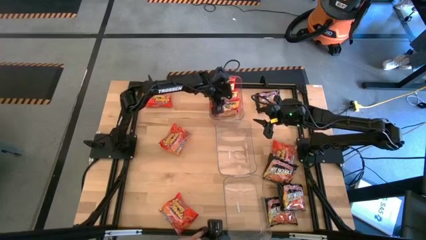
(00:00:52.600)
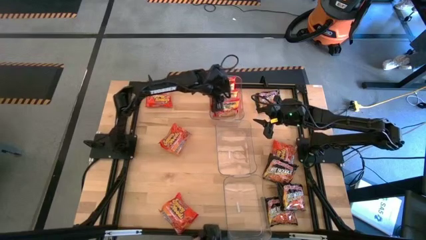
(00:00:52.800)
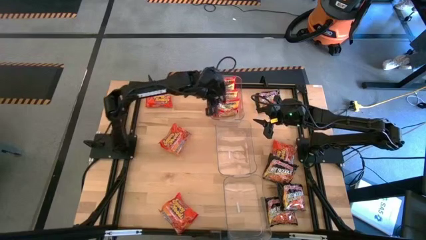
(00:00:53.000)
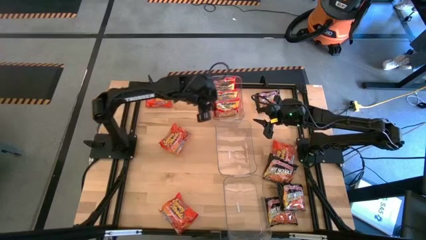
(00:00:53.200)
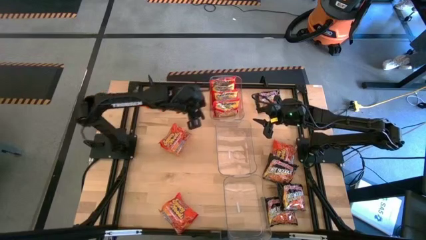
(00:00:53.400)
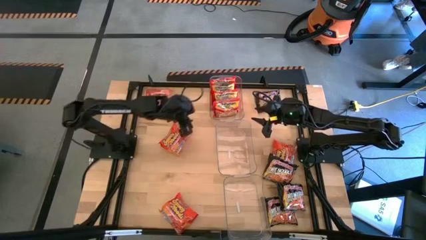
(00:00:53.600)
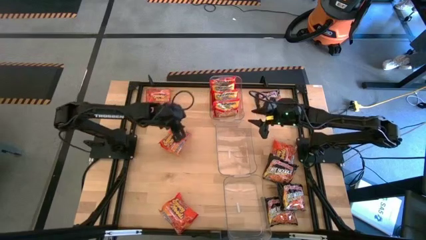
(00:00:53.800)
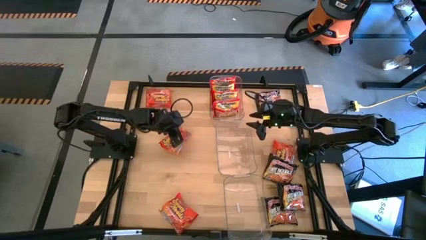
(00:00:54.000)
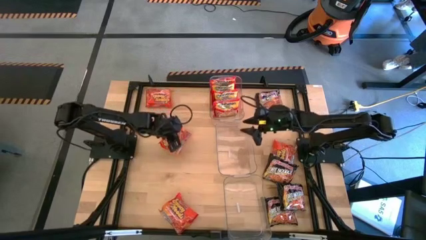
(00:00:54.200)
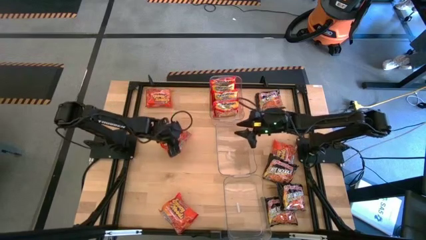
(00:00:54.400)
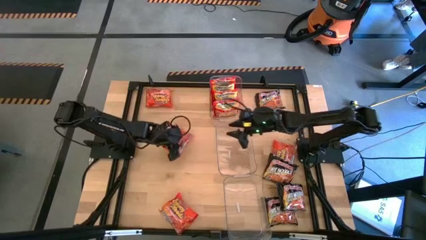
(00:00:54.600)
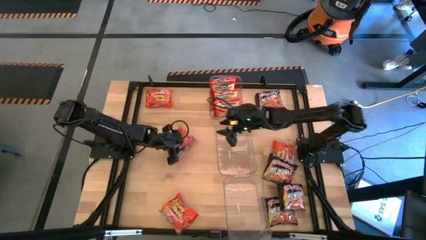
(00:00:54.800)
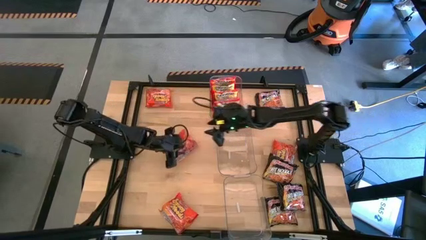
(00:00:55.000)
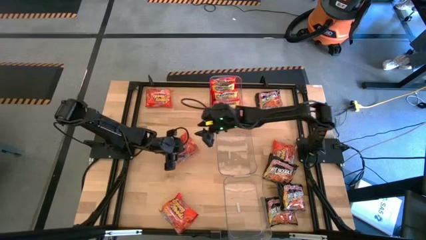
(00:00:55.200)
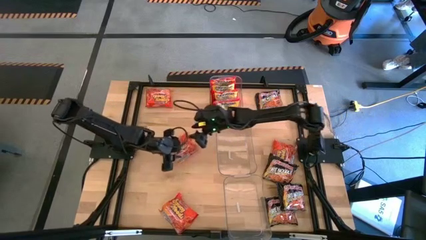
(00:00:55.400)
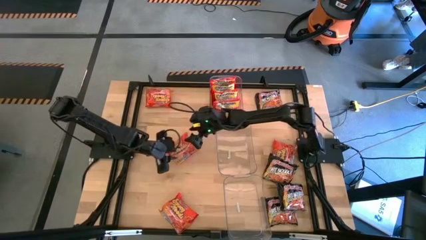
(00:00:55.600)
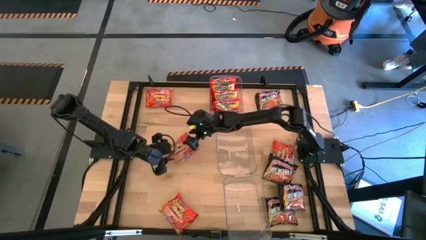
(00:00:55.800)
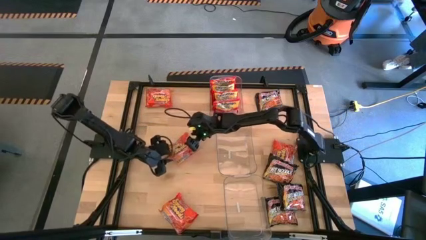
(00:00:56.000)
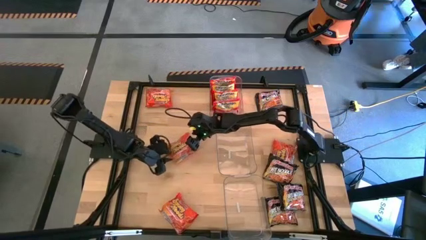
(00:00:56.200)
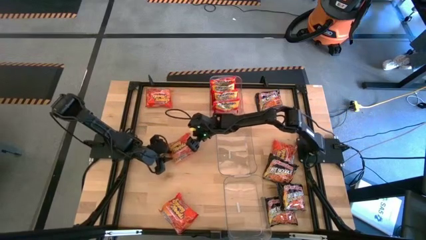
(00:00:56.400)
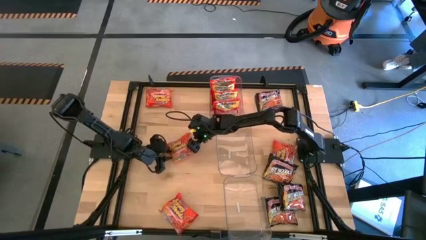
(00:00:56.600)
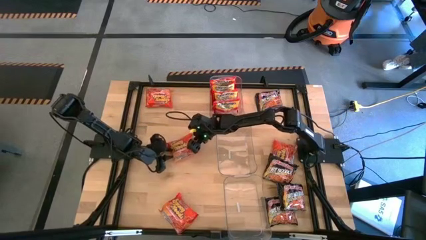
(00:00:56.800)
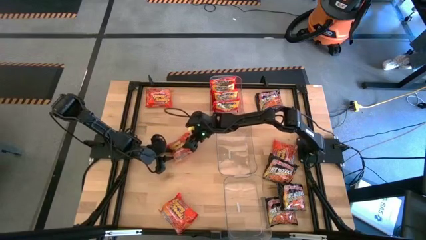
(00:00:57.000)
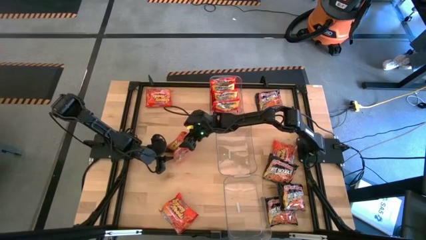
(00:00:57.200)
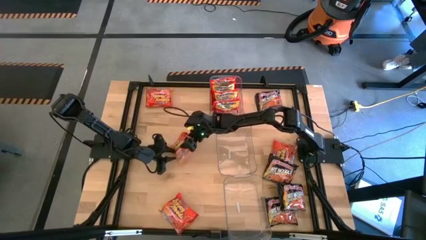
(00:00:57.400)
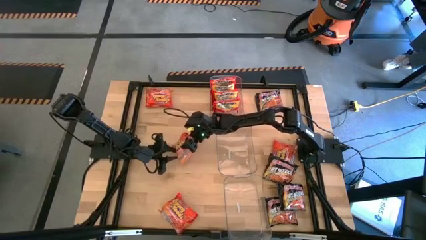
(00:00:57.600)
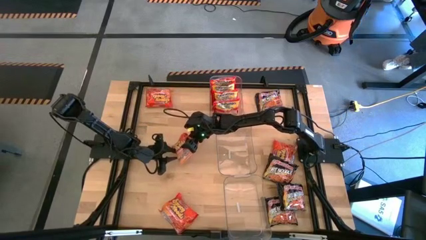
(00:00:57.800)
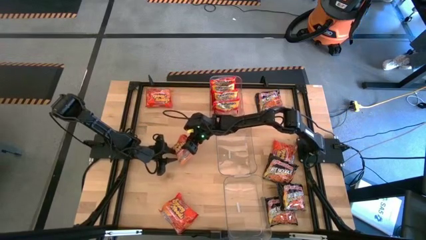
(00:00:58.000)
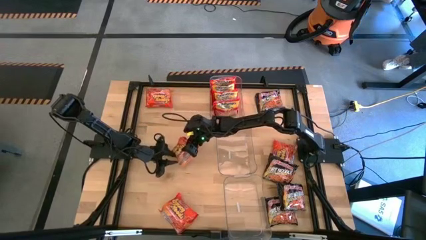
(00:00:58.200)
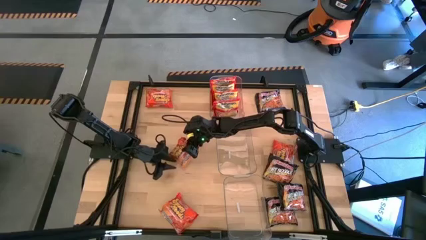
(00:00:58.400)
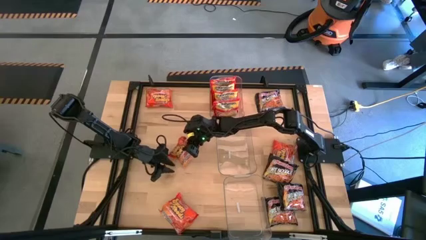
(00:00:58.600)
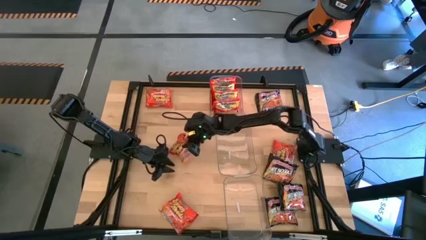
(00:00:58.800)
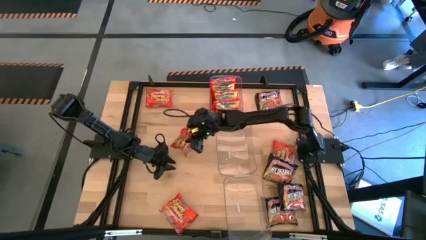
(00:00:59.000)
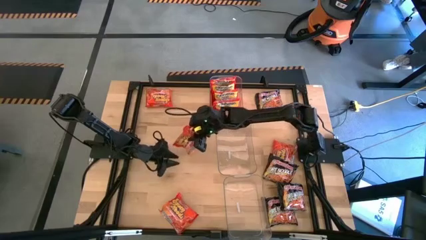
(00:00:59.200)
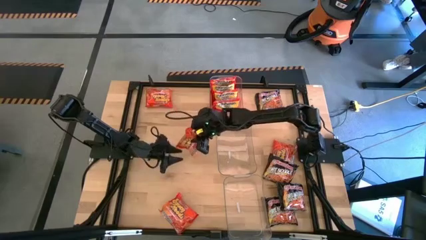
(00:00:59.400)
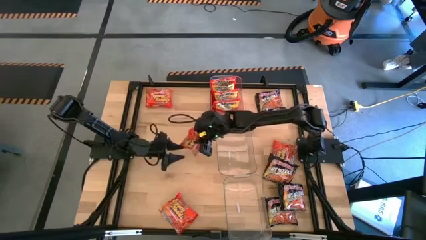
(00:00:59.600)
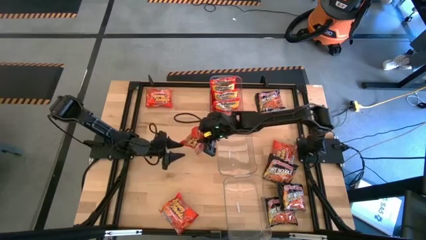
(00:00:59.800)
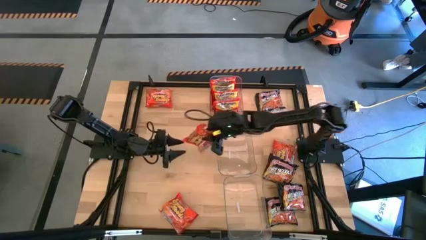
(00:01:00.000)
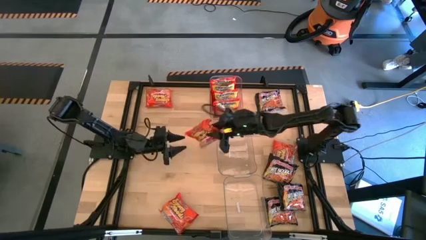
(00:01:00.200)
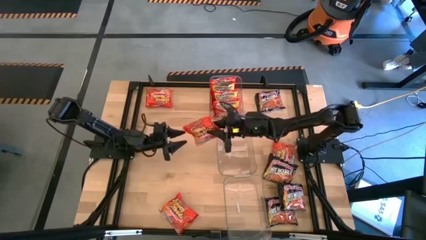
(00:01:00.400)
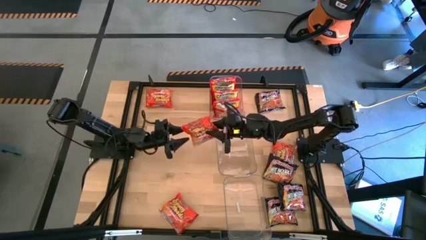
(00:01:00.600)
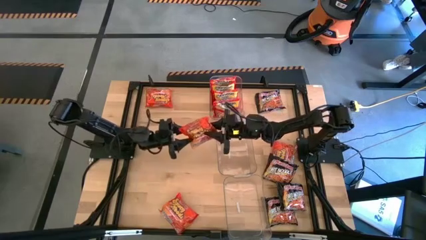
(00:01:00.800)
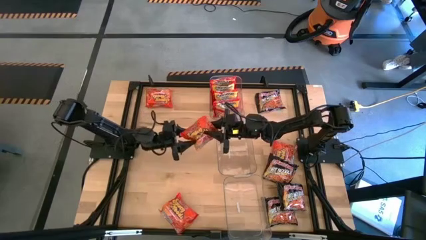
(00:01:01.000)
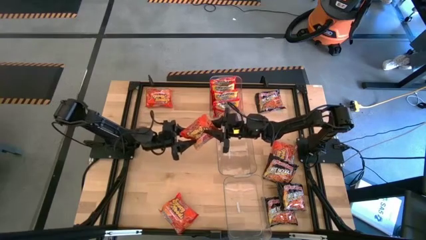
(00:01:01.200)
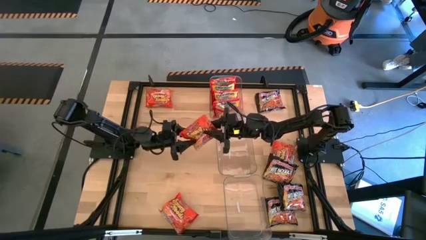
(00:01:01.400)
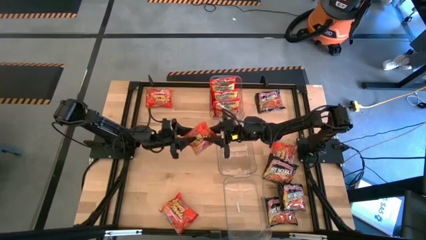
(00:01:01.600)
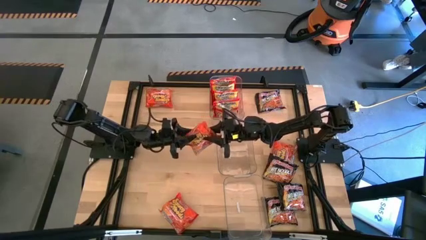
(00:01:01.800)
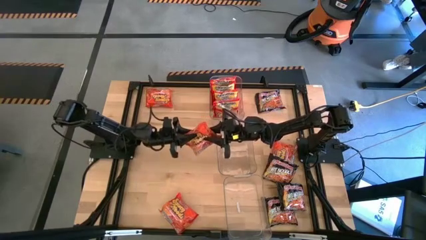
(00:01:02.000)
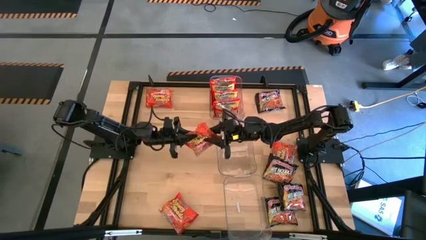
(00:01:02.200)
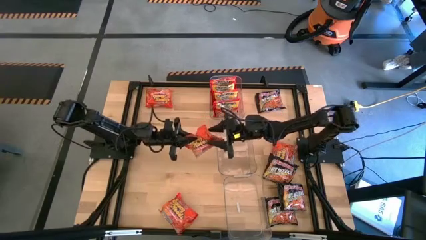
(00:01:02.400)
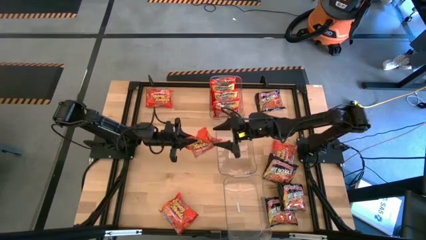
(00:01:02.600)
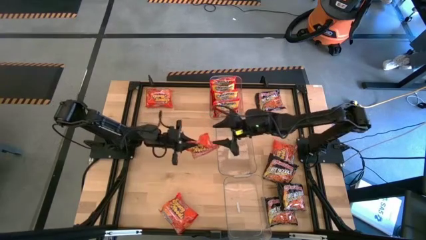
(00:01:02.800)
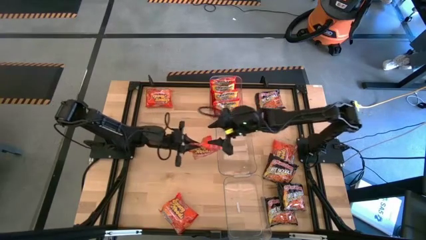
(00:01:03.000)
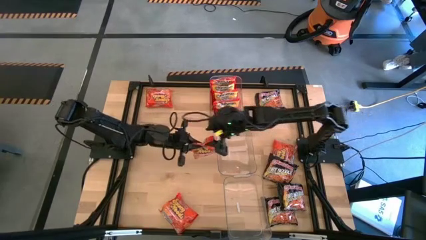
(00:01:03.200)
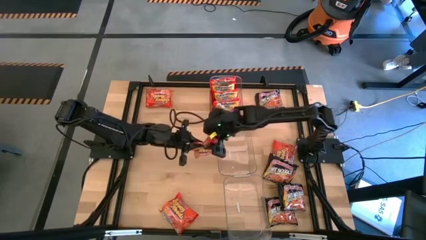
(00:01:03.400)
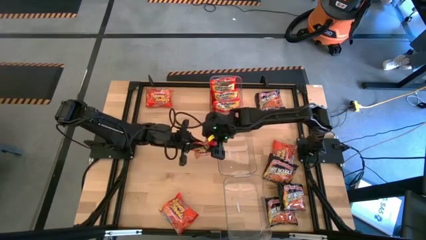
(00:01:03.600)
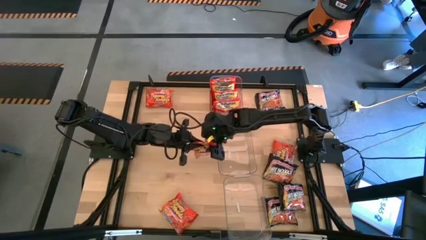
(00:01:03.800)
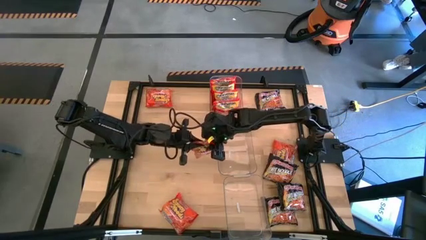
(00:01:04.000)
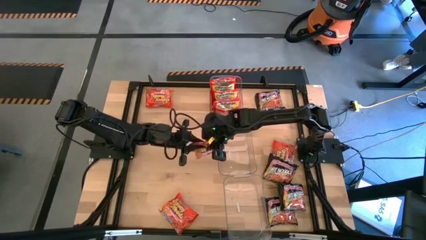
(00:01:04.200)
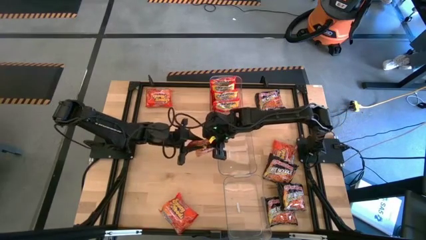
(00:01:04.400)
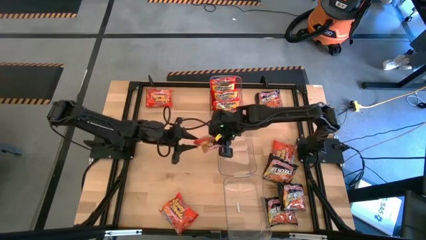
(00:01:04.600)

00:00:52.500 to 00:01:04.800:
Task: Sort Maruchan noodles
Put the orange noodle pack into the middle transparent bin

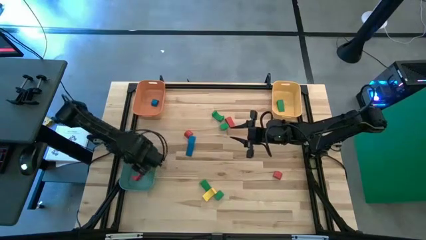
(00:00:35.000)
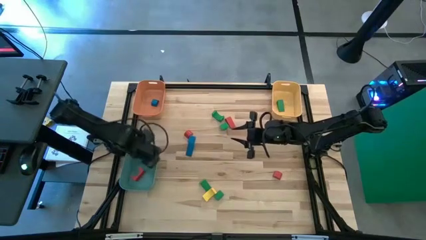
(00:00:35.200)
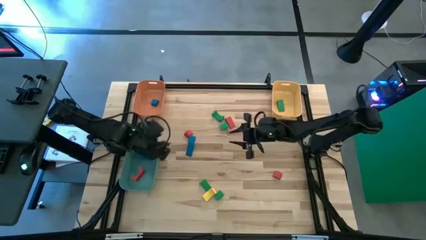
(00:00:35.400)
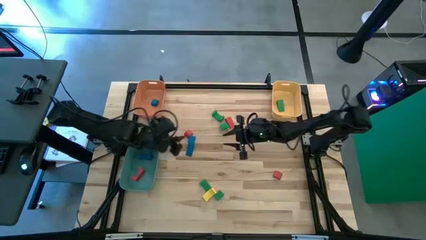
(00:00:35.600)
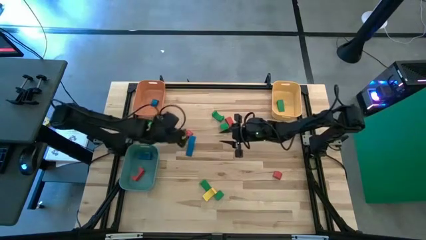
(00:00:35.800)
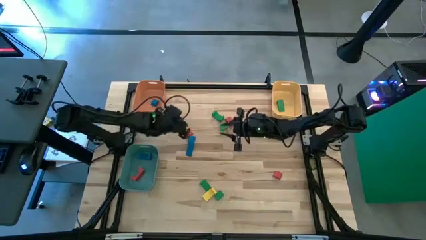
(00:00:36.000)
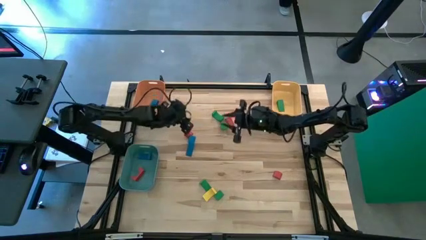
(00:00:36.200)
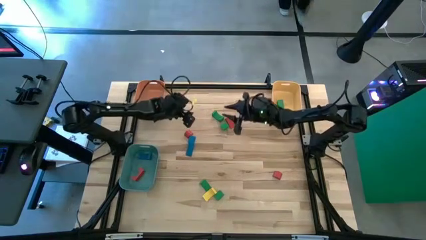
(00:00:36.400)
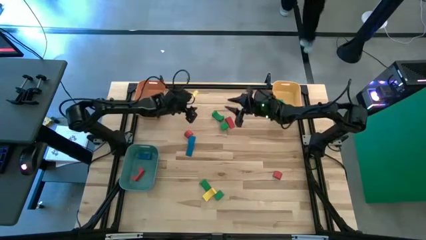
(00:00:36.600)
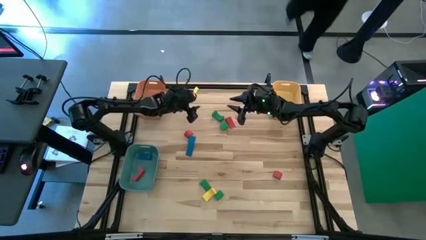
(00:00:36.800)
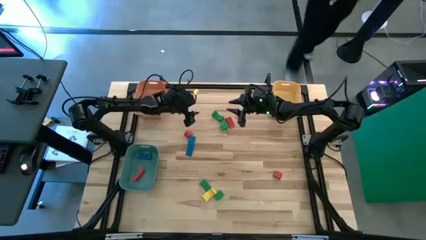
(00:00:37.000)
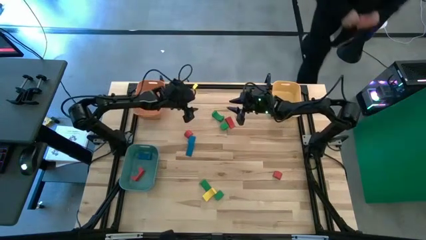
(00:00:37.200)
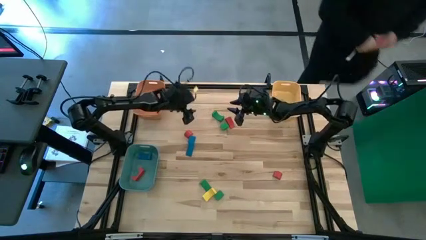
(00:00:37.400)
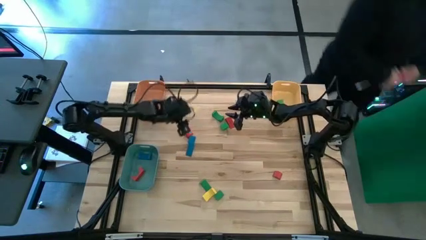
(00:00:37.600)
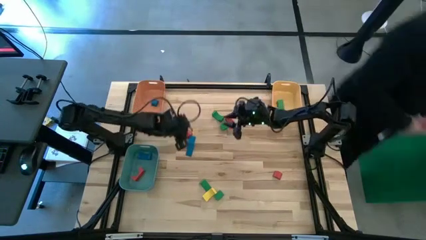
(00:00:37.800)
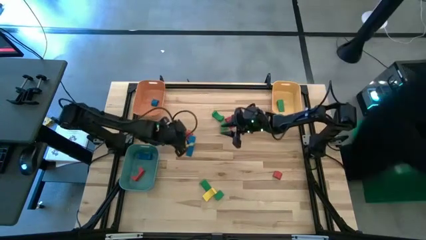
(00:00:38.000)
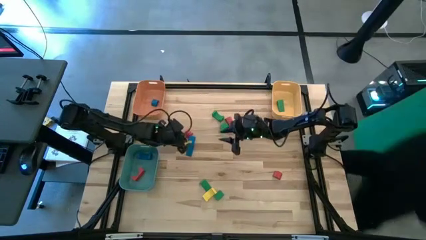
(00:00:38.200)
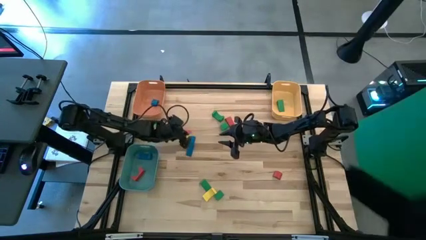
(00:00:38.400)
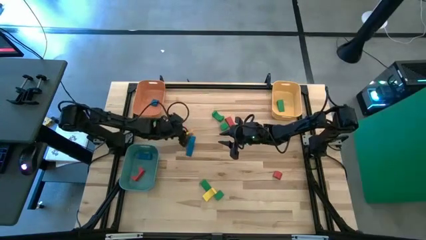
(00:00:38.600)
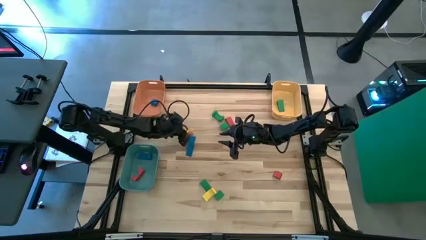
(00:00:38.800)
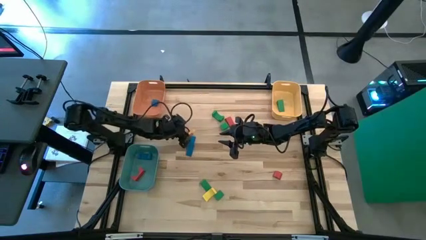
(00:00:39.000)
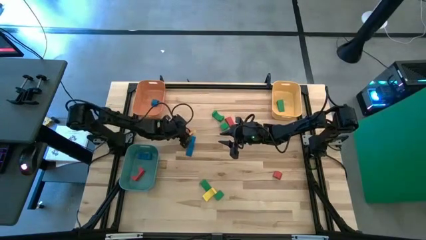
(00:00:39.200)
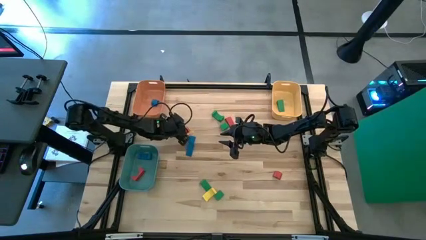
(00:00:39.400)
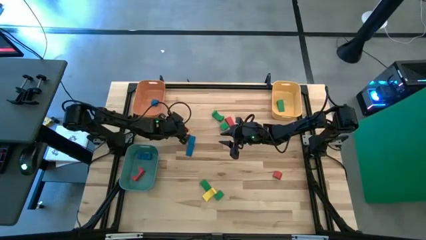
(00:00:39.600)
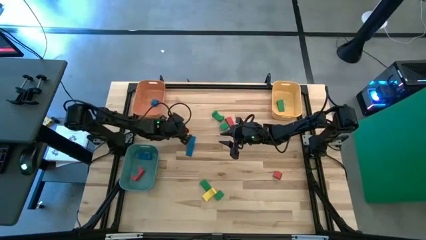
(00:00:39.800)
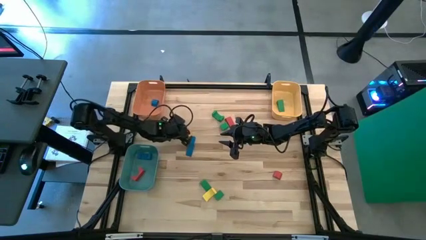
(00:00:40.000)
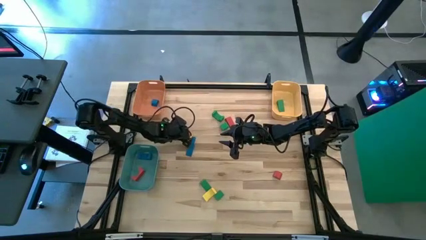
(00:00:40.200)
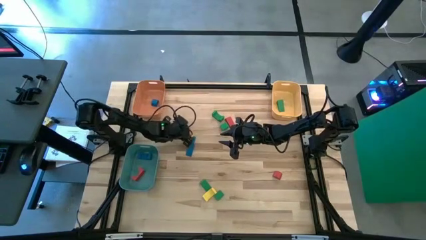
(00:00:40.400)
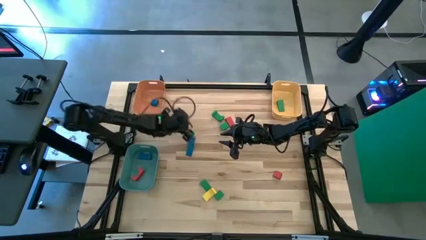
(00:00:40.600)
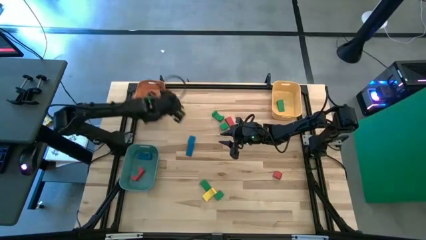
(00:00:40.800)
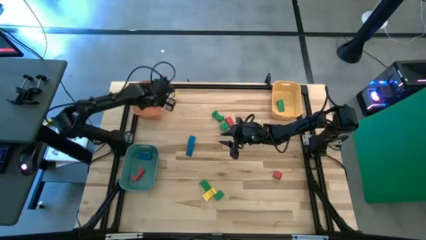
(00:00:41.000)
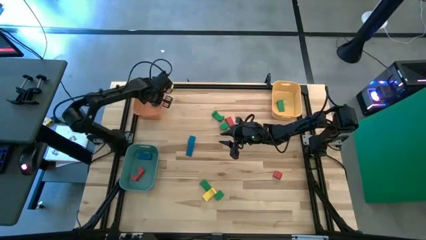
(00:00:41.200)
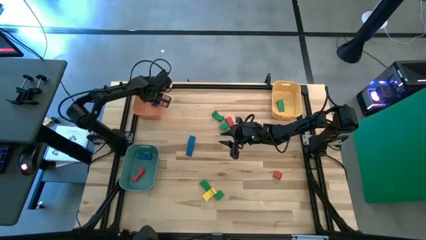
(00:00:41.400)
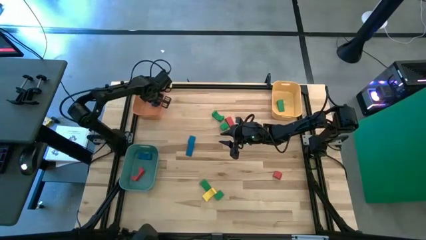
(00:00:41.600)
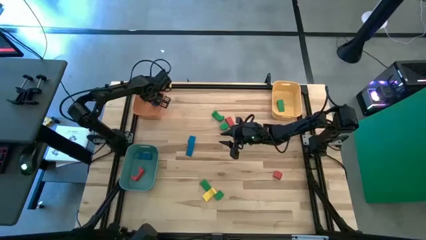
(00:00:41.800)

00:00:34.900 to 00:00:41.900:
Task: Sort blocks by size
Put the red half circle block into the orange bin
